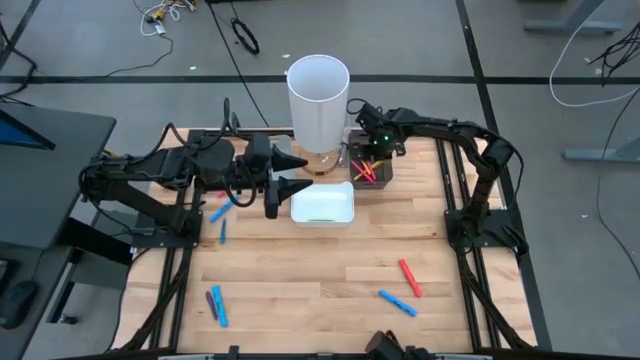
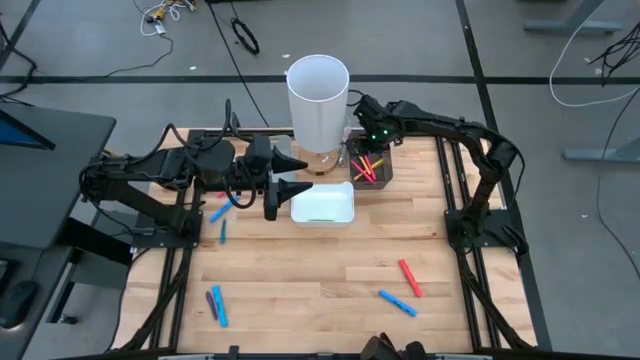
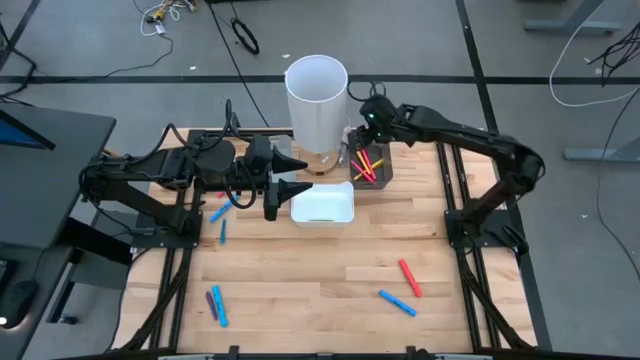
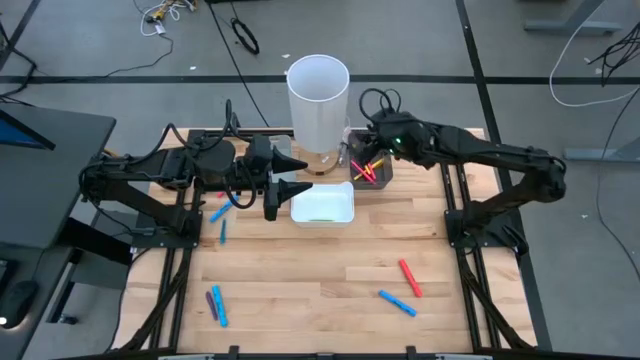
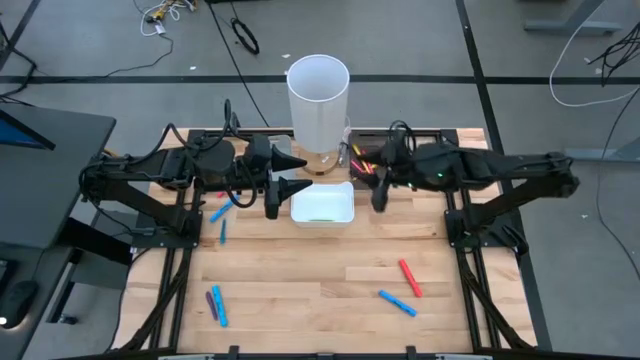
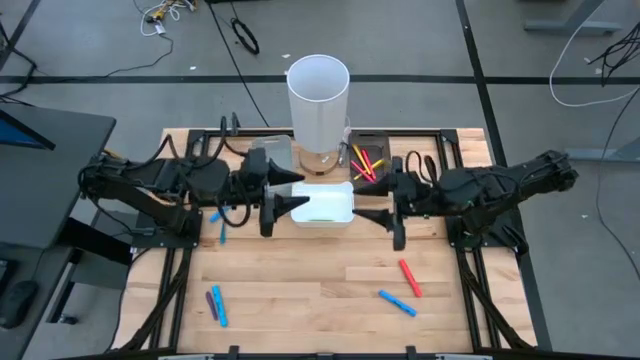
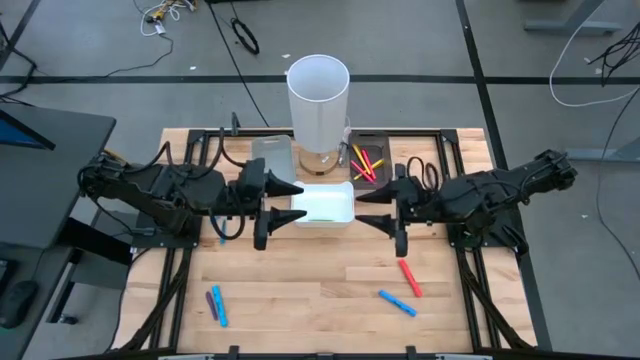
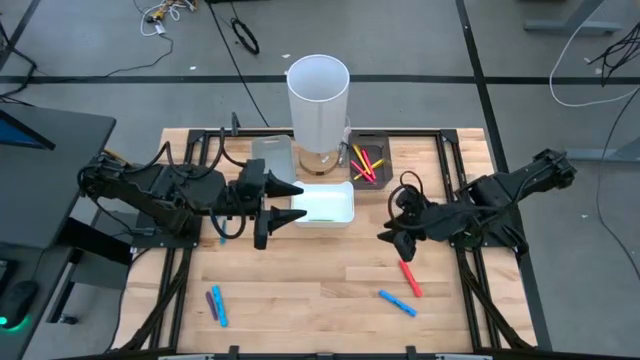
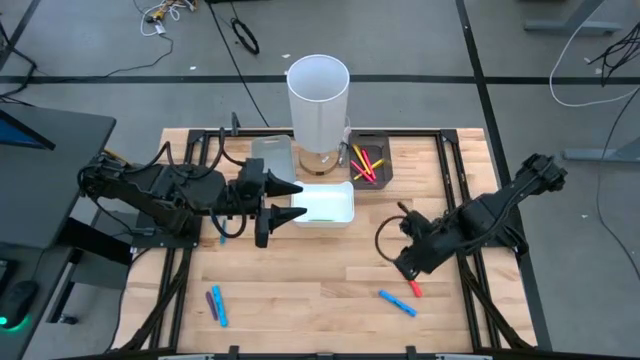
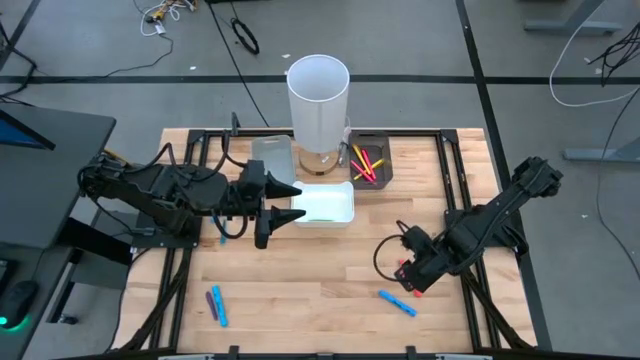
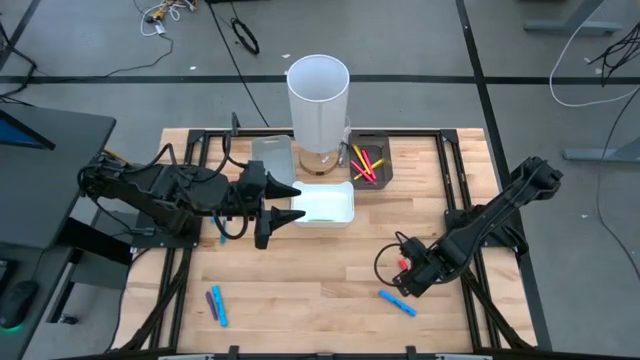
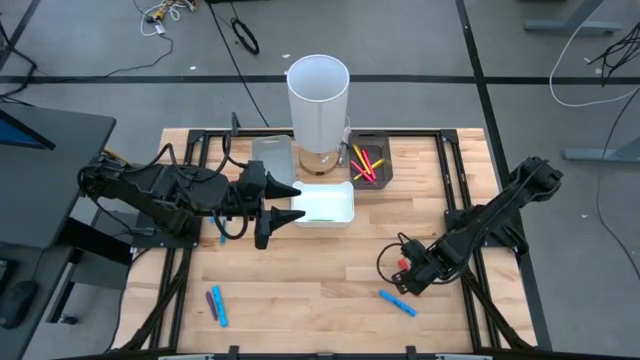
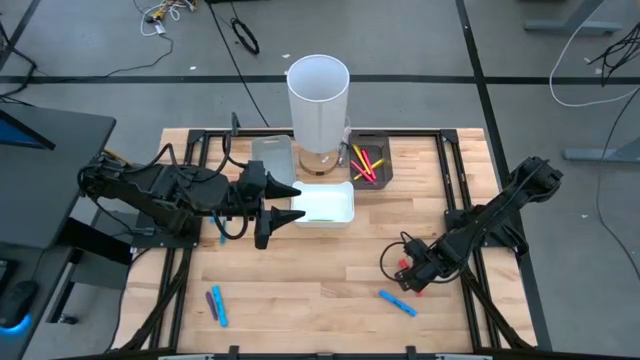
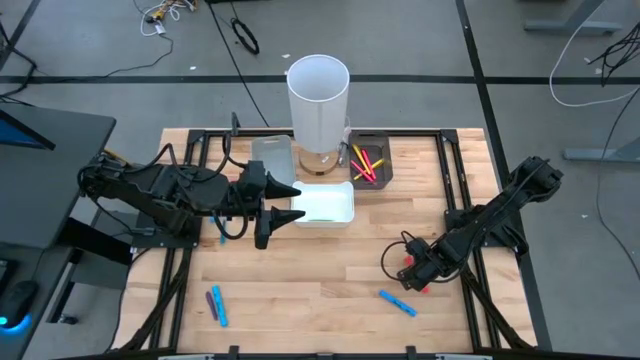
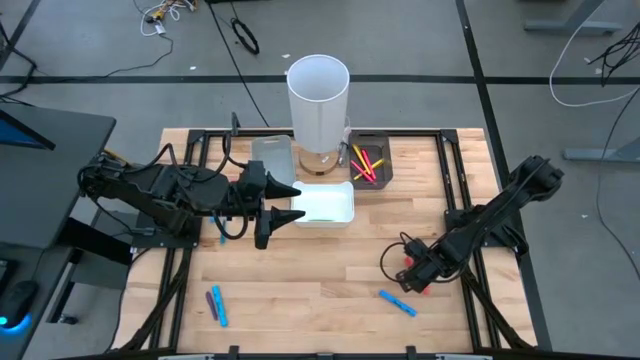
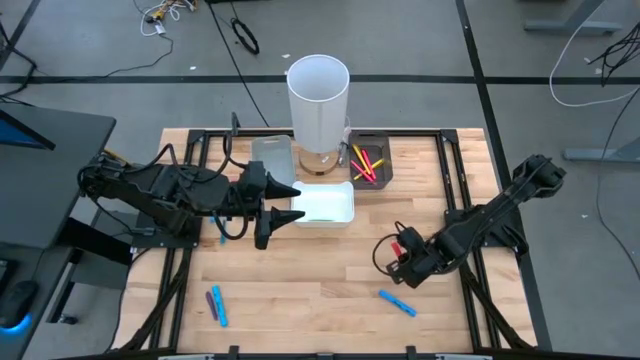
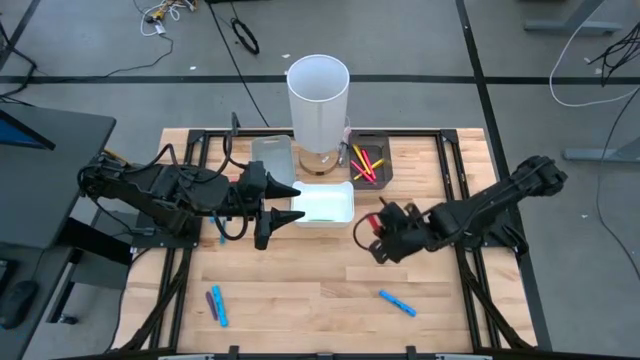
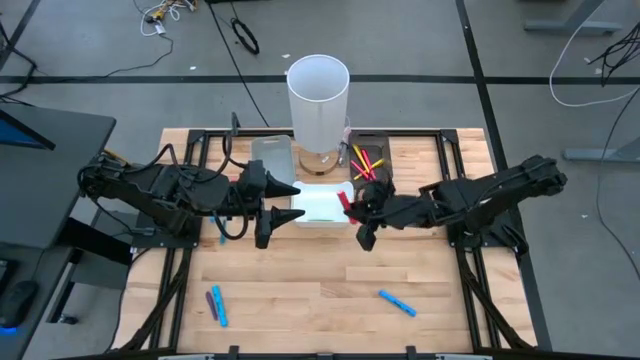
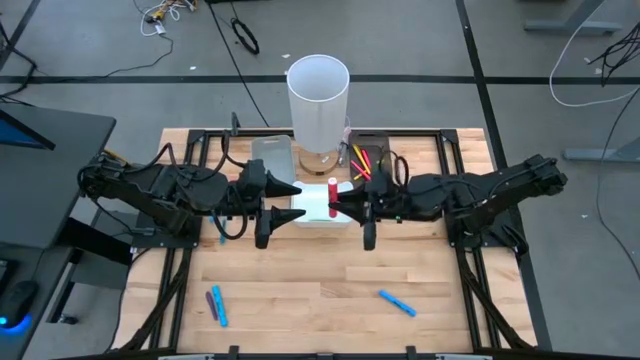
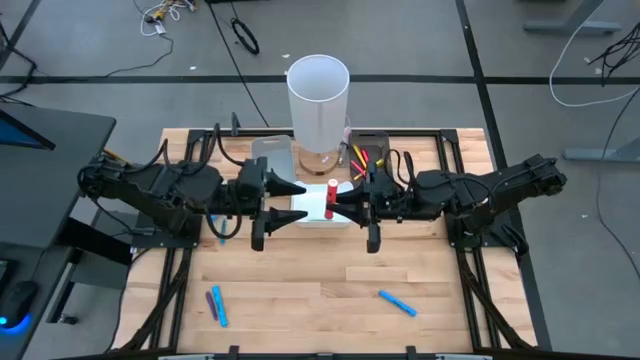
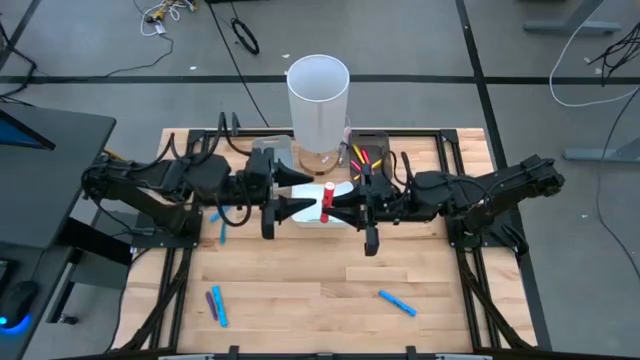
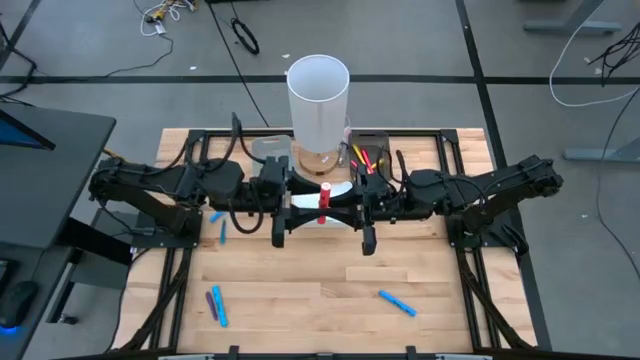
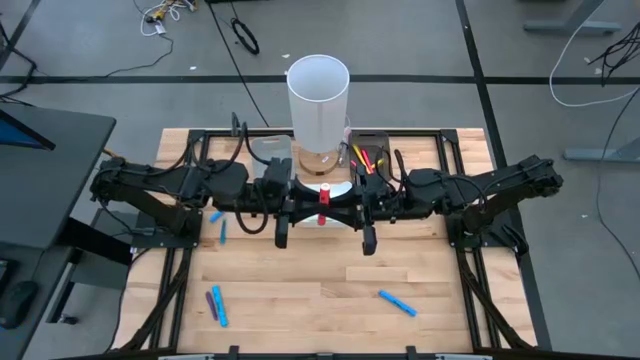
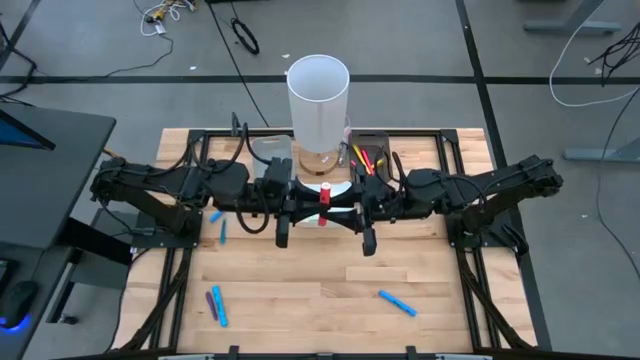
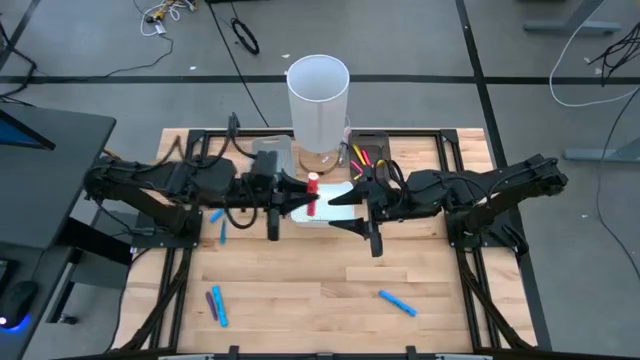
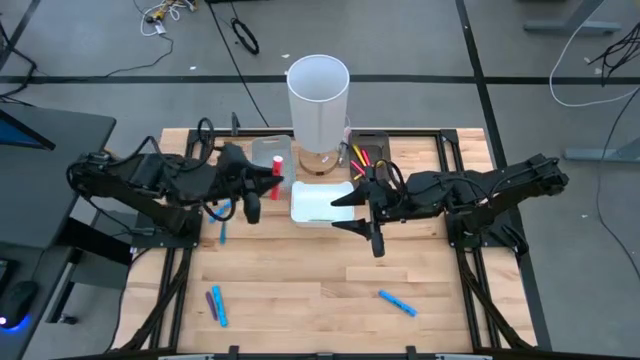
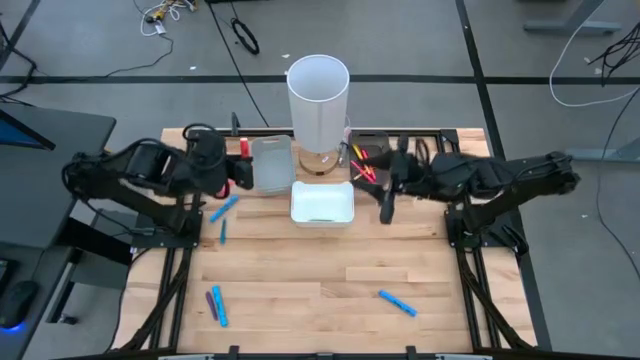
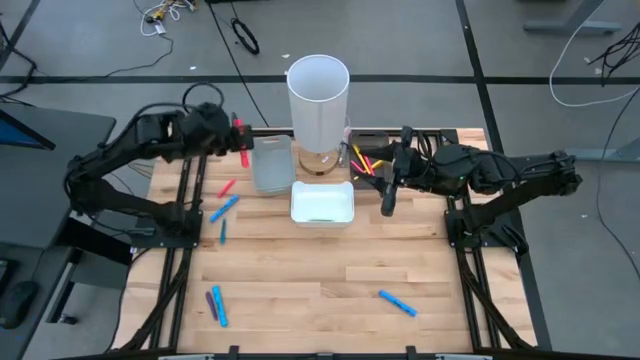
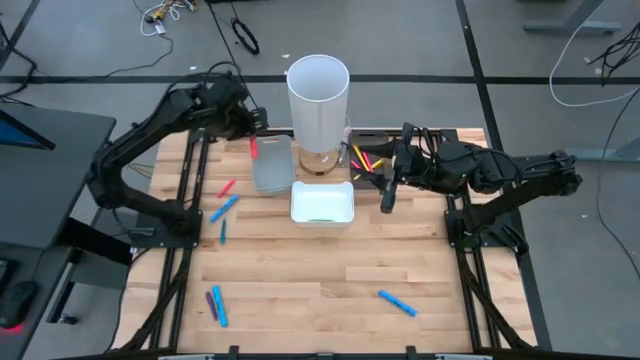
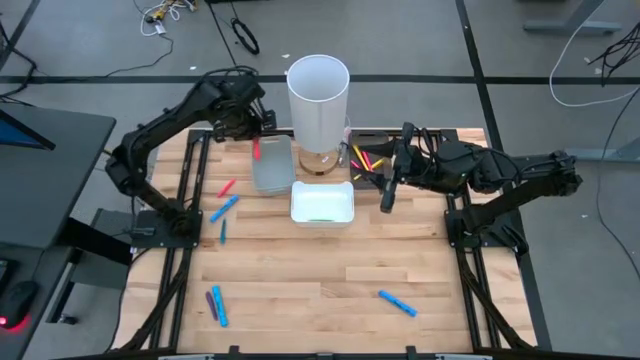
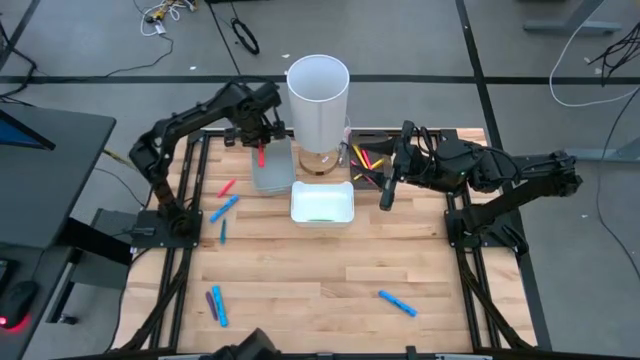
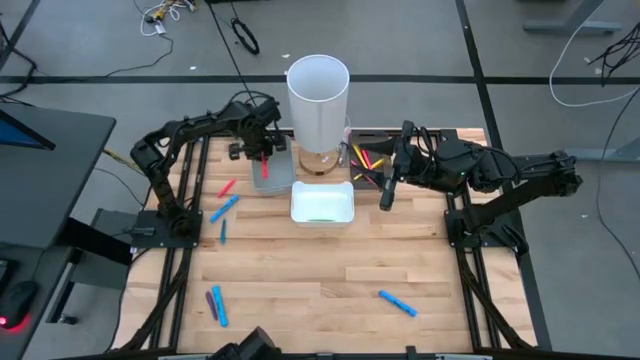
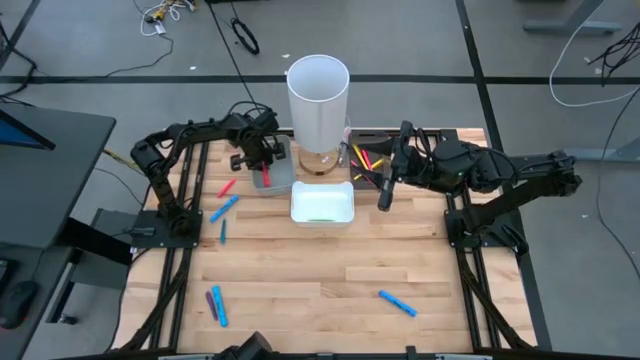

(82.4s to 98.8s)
Task: Pick & Place Markers
Put the red highlighter pen into the gray bin

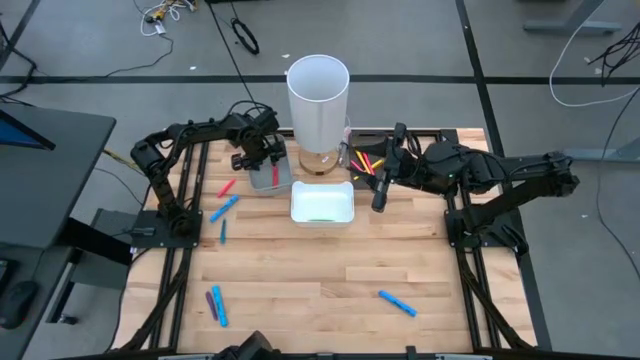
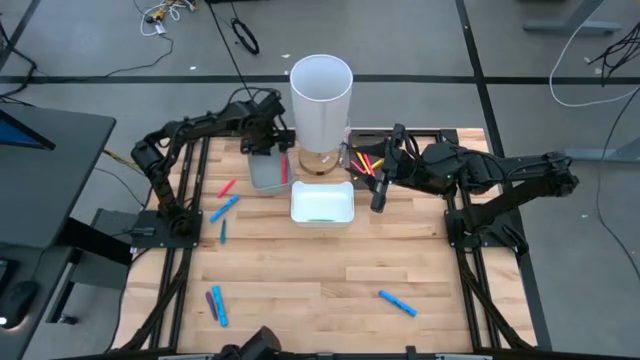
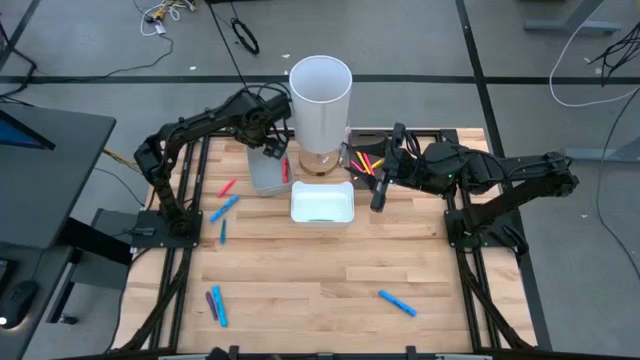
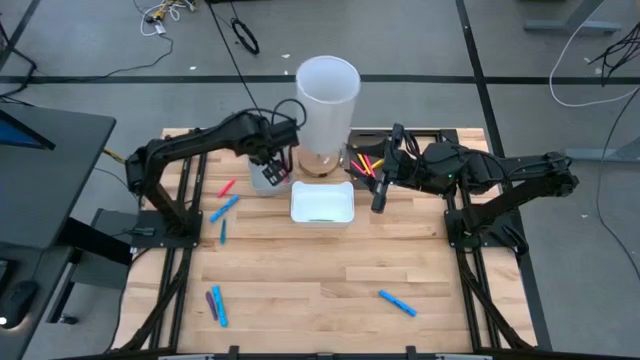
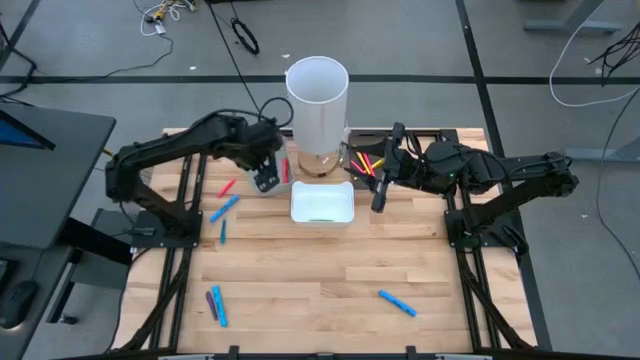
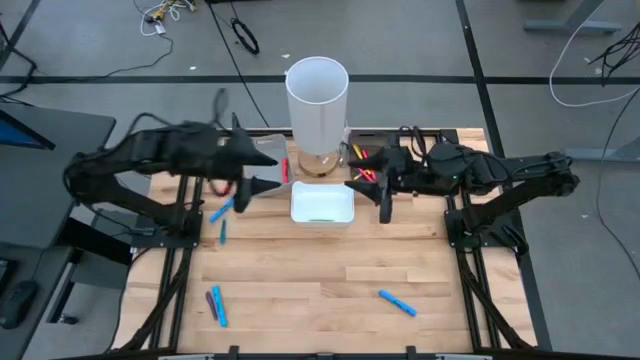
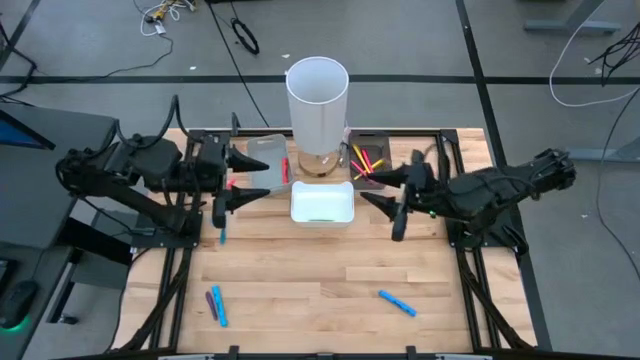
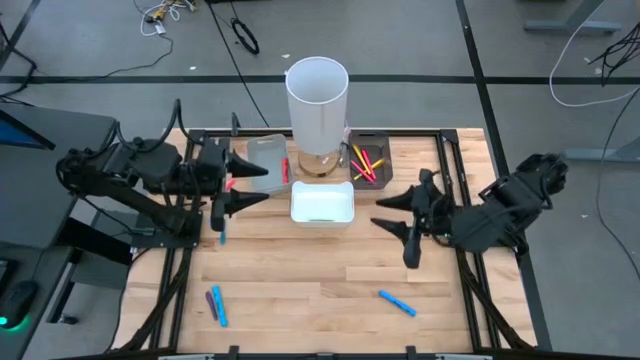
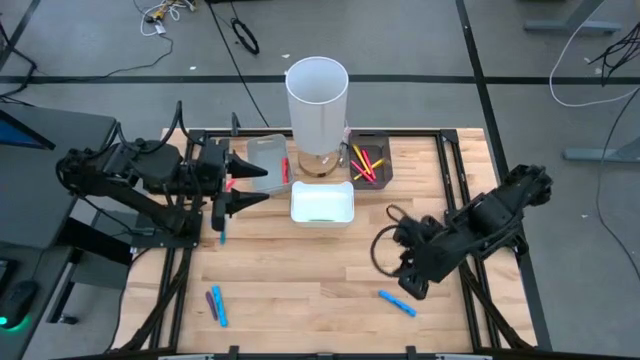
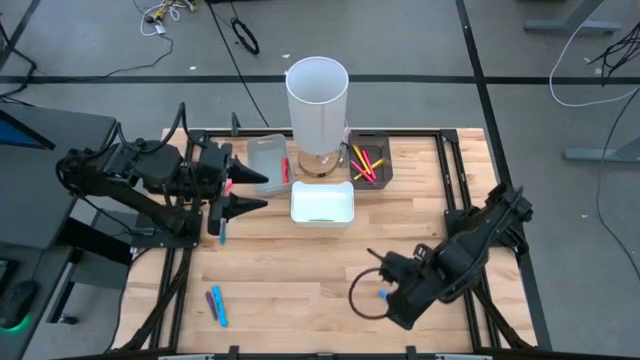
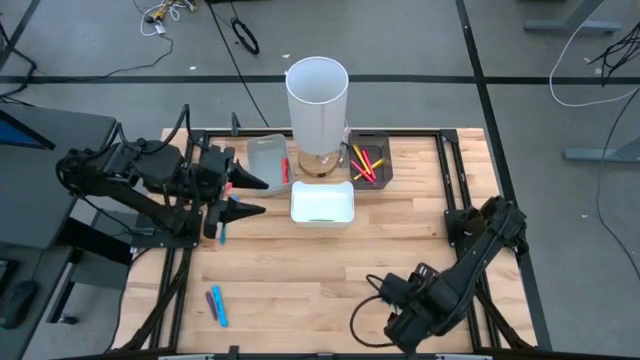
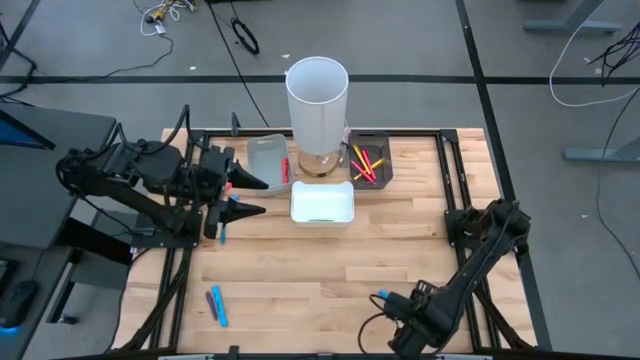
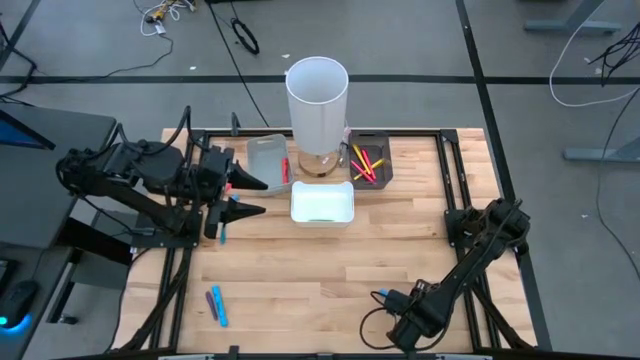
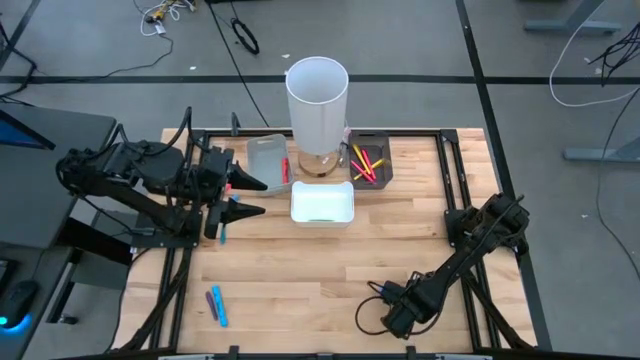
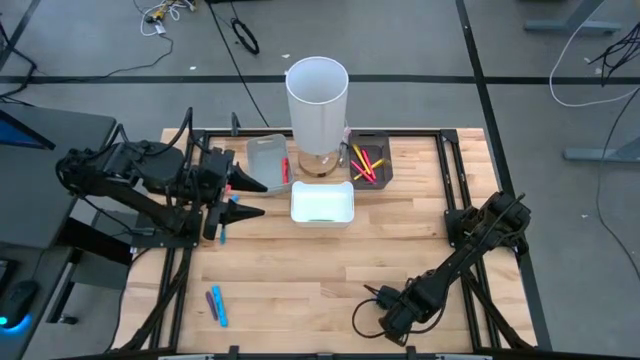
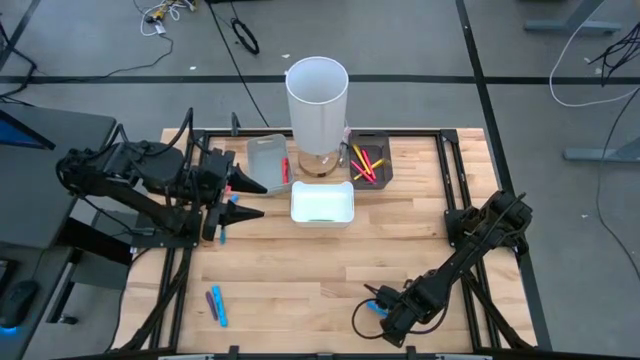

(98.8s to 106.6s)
Put the bottom right blue highlighter pen into the gray bin
